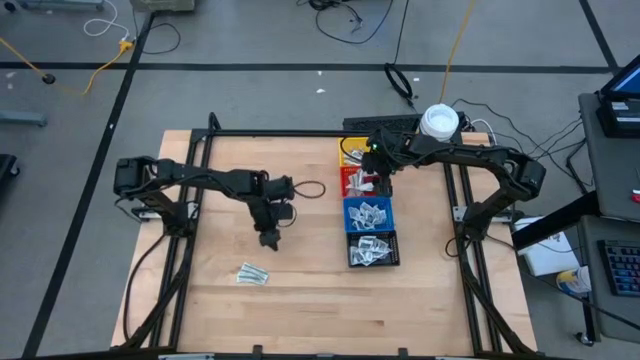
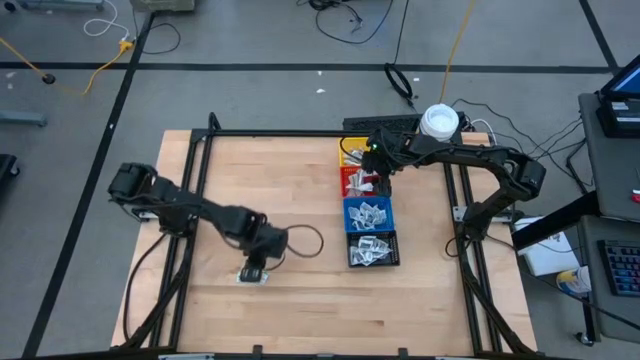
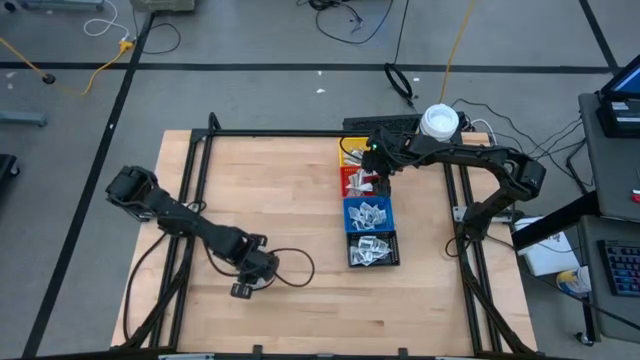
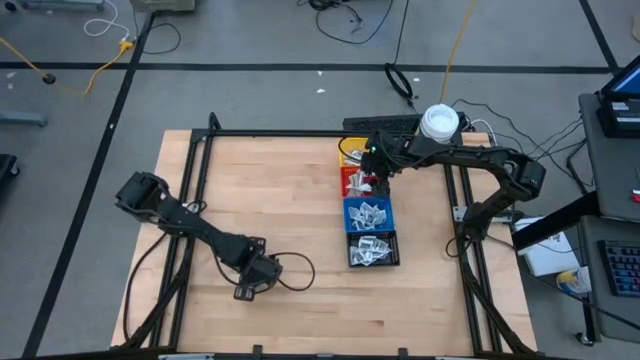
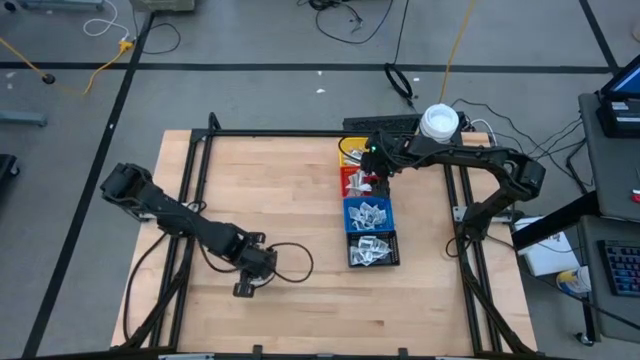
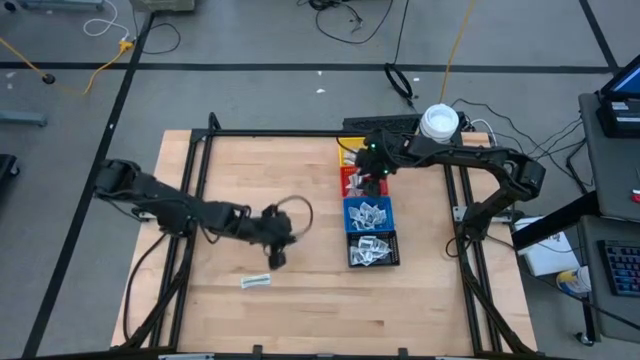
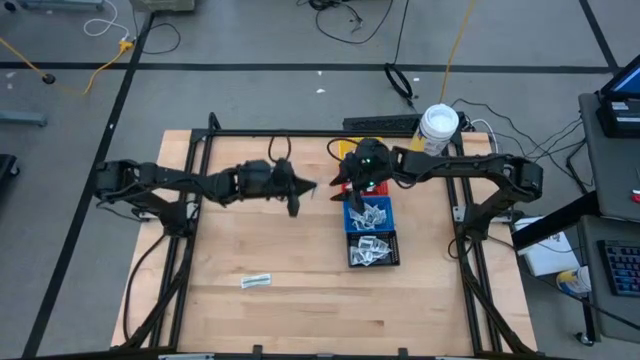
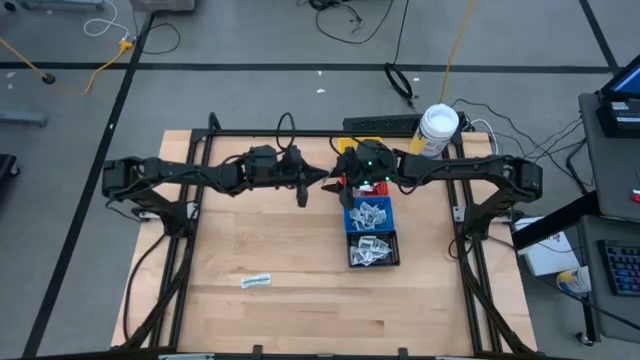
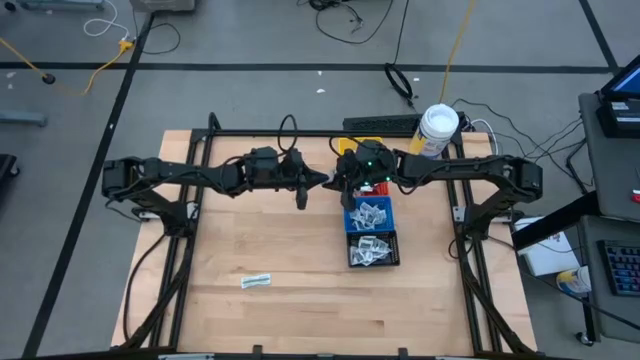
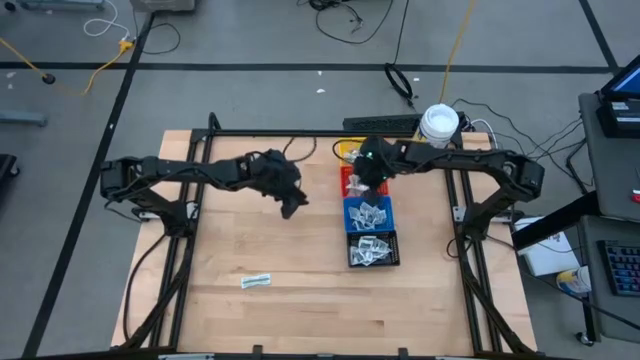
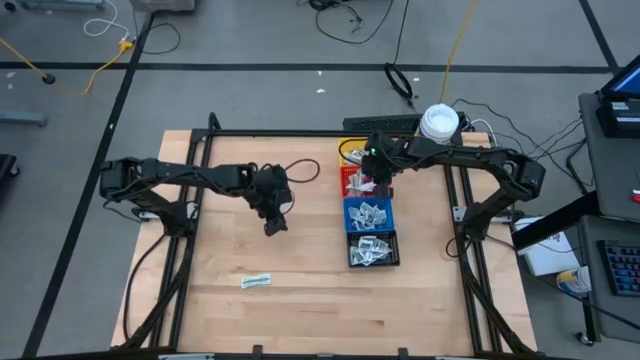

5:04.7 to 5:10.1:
Task: Pick & Place First Aid Supplies
Put the green bandage pack into the red bin

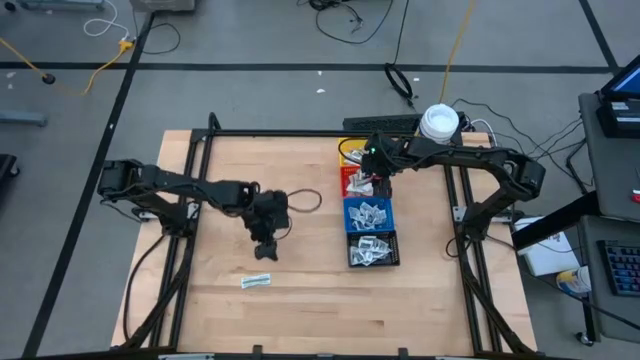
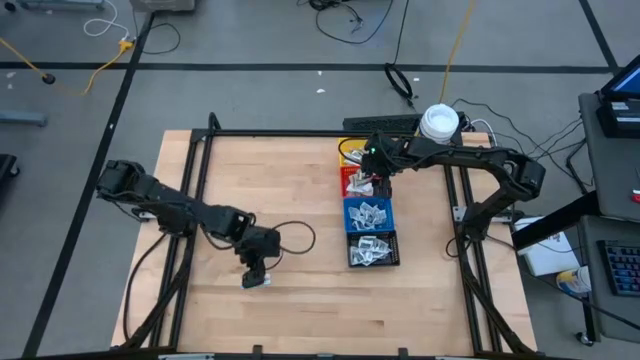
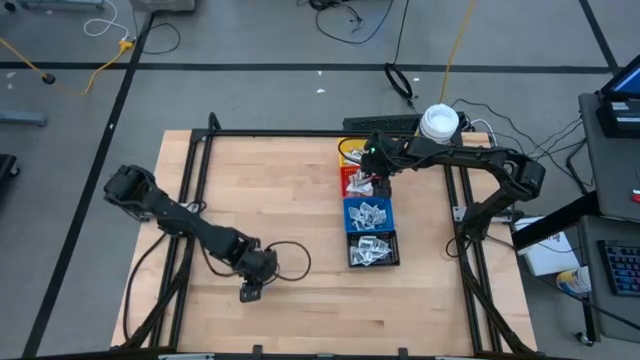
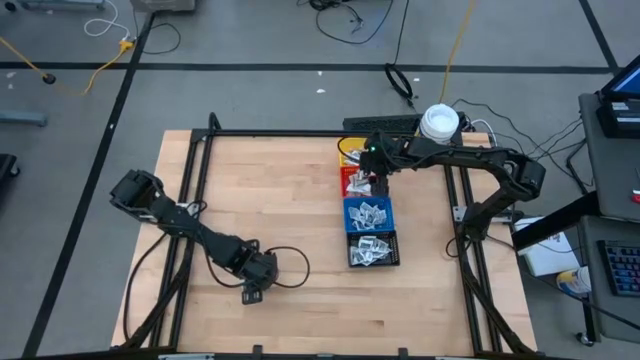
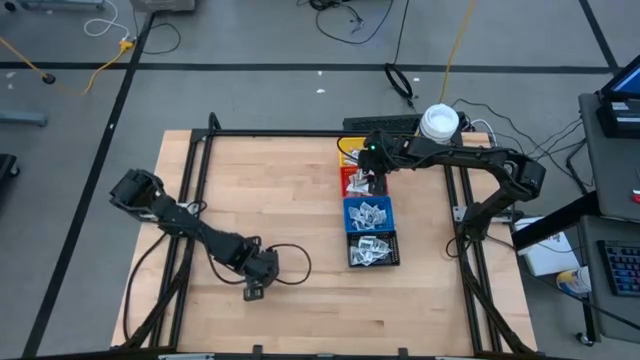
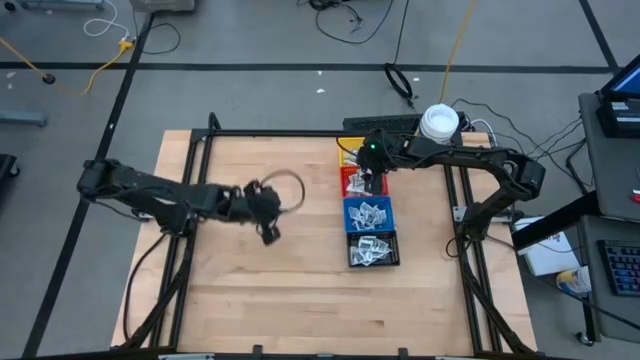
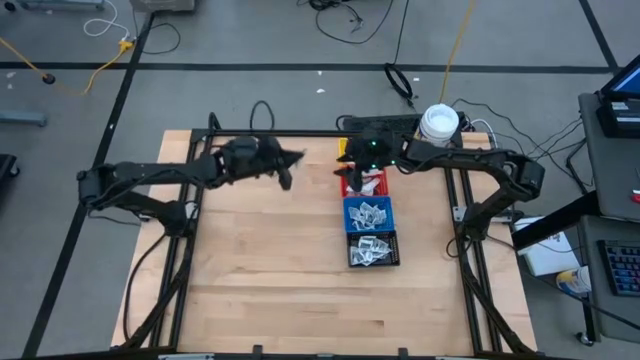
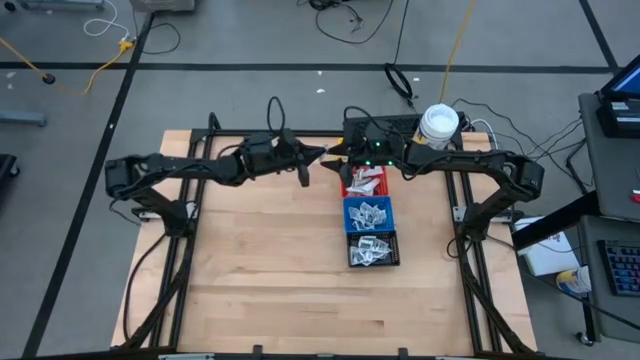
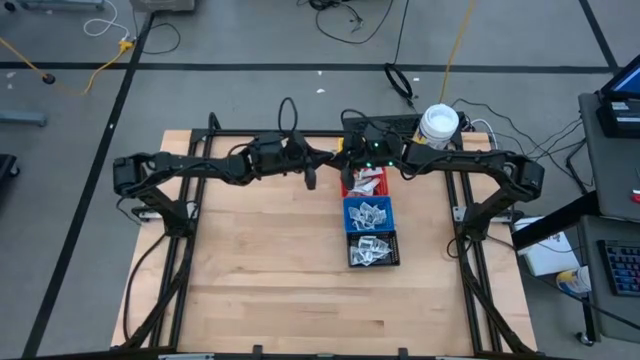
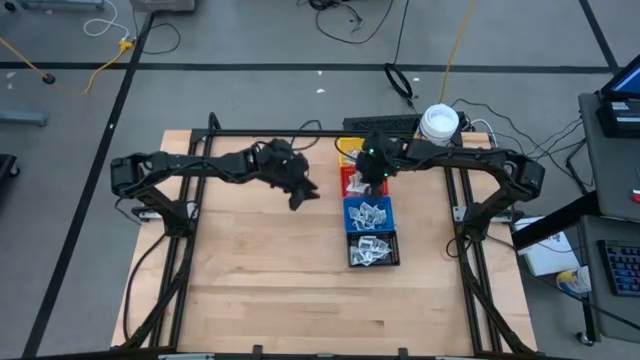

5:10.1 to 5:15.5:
Put the green bandage pack into the red bin

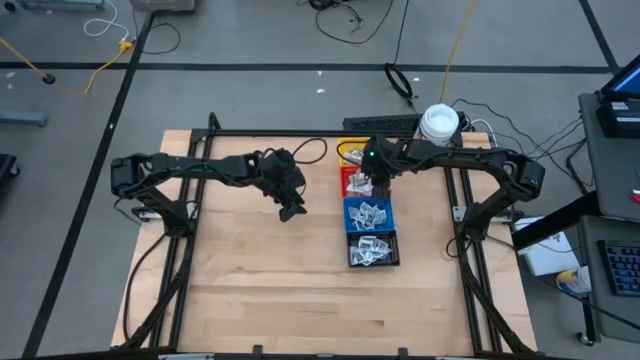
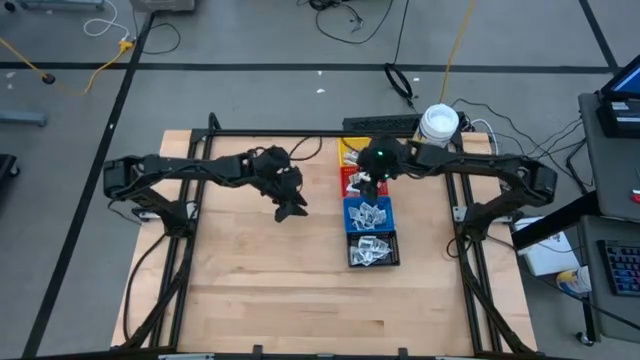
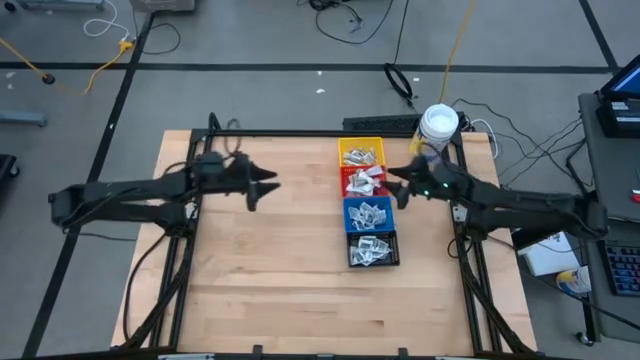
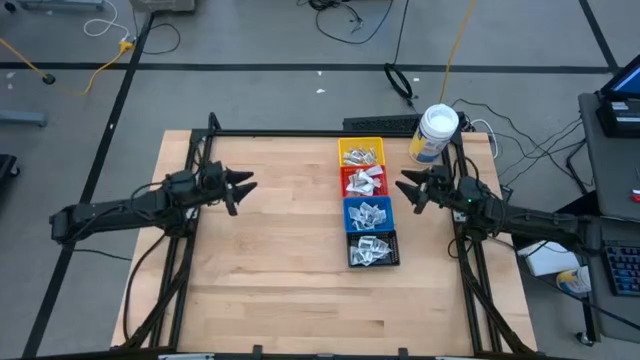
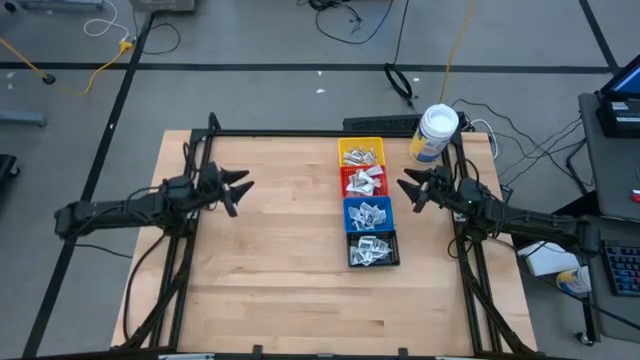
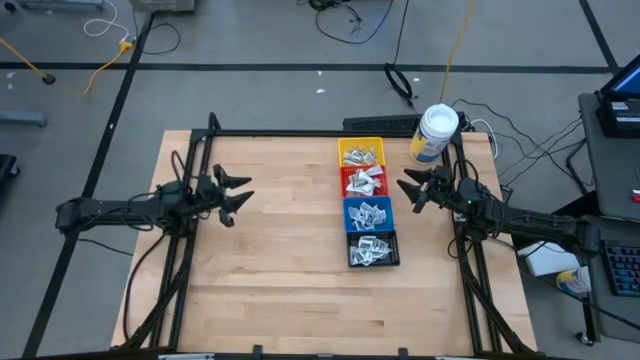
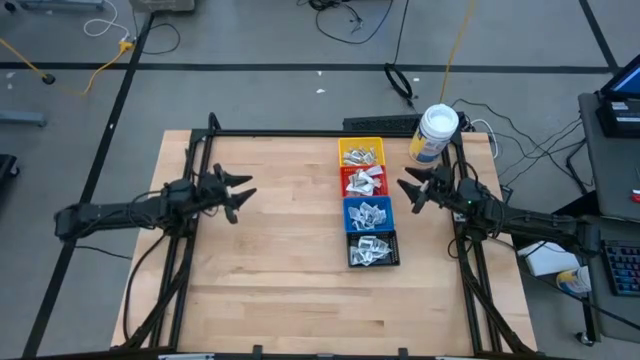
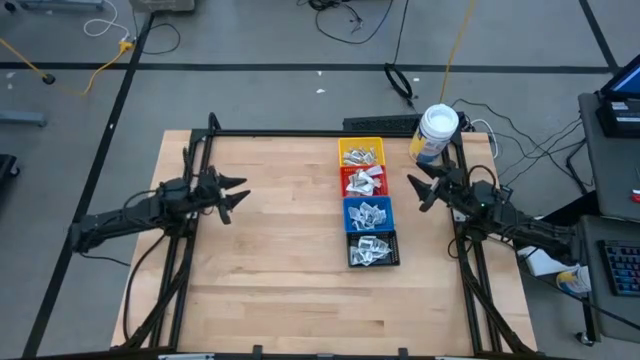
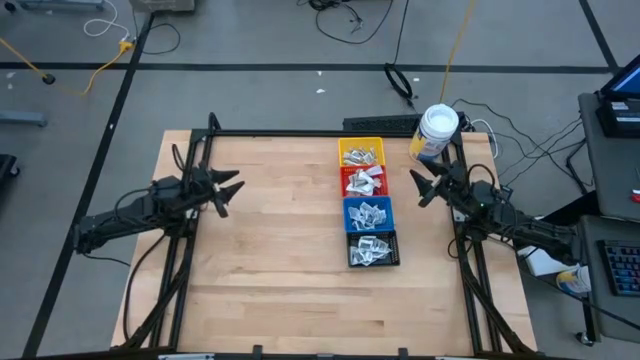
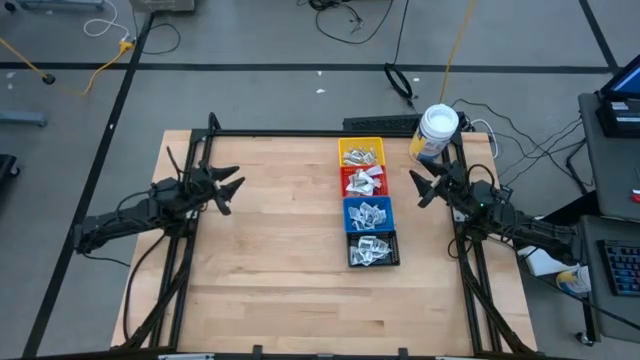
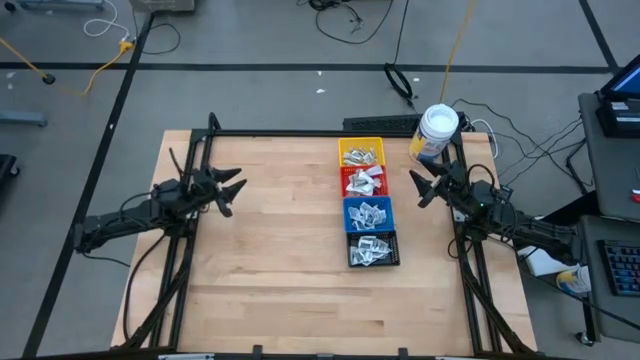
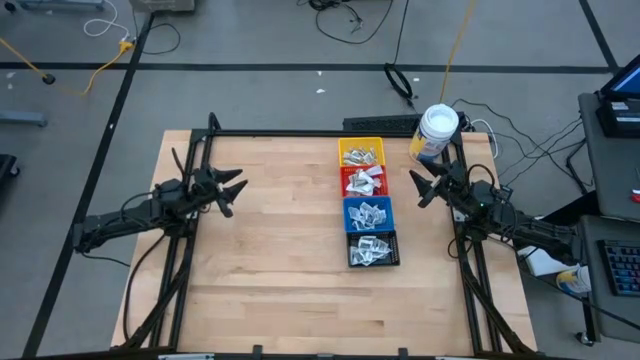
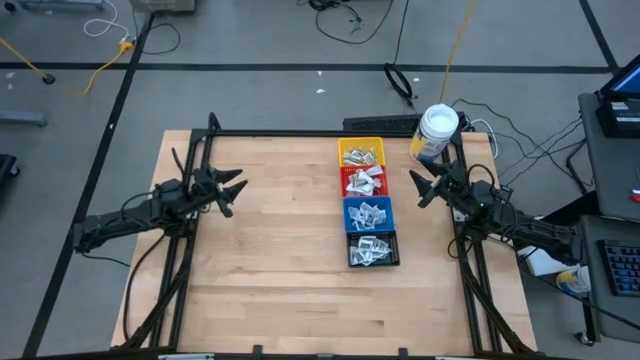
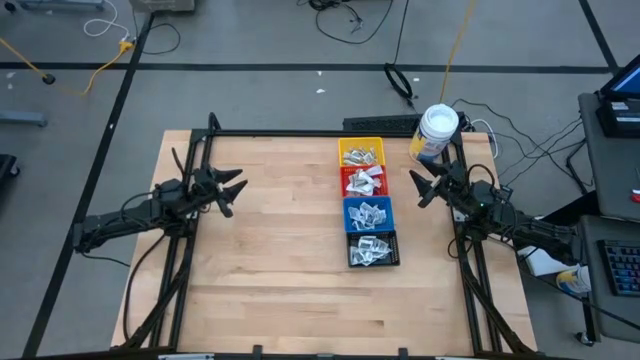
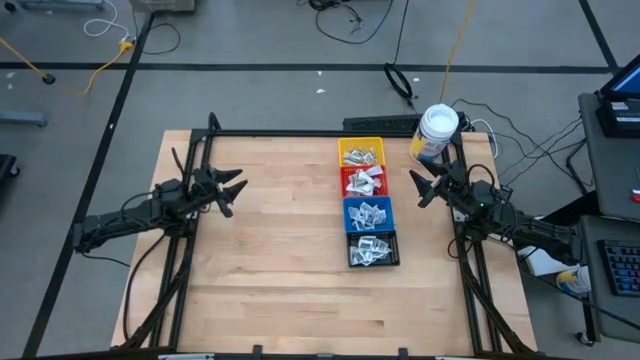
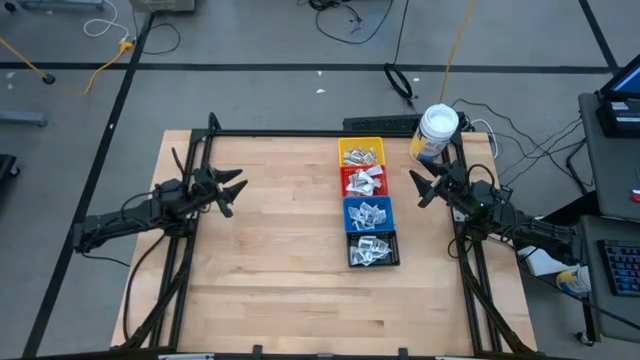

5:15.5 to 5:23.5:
Return to Home Position

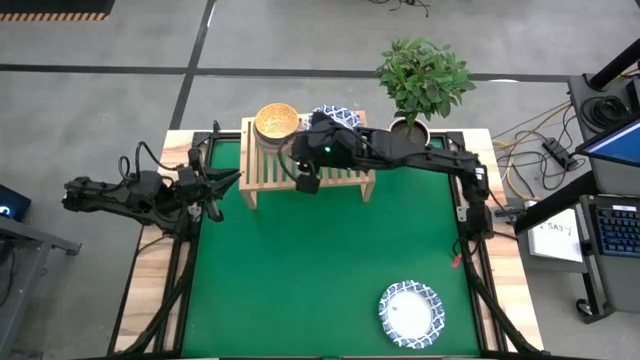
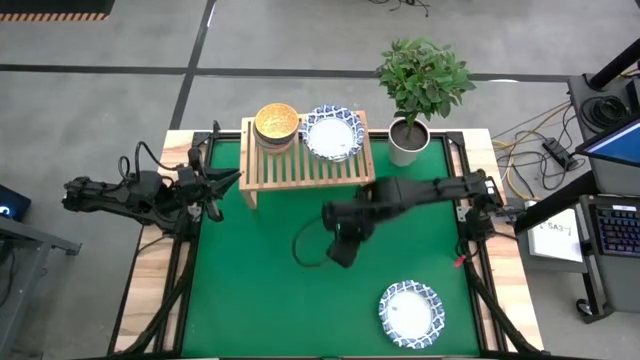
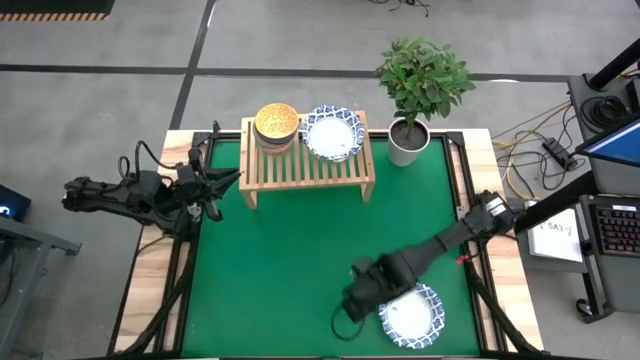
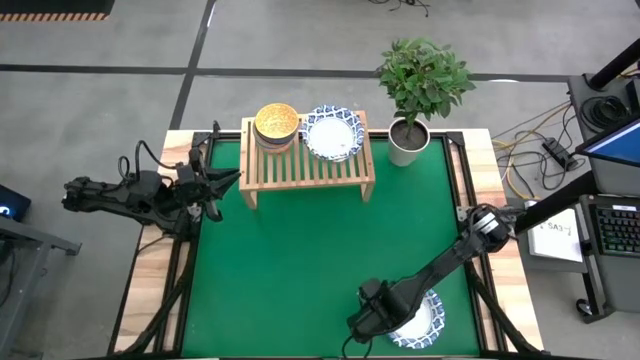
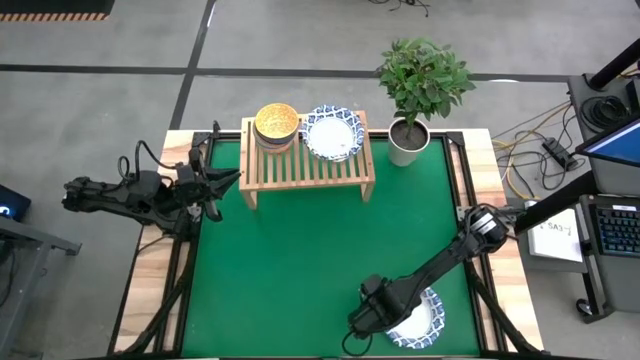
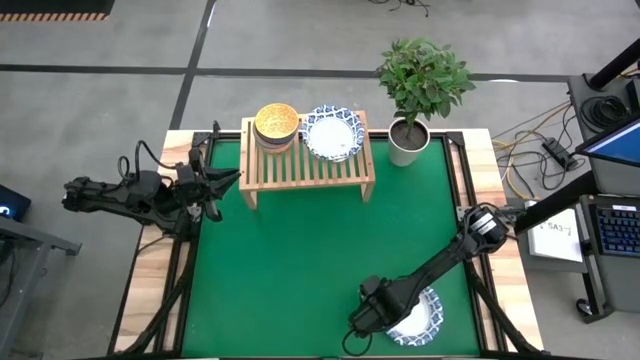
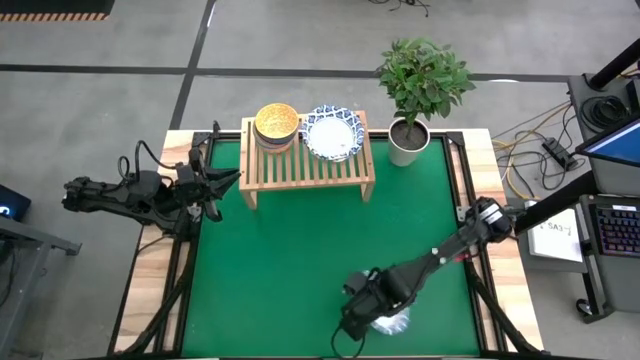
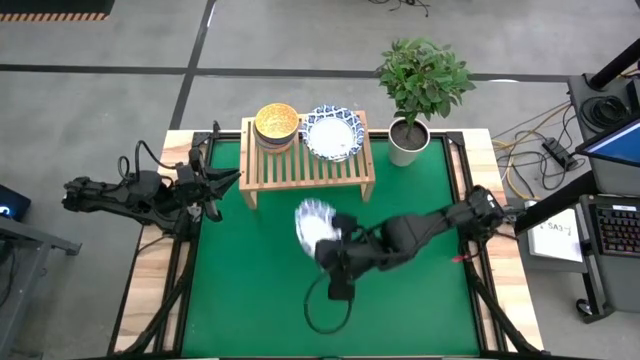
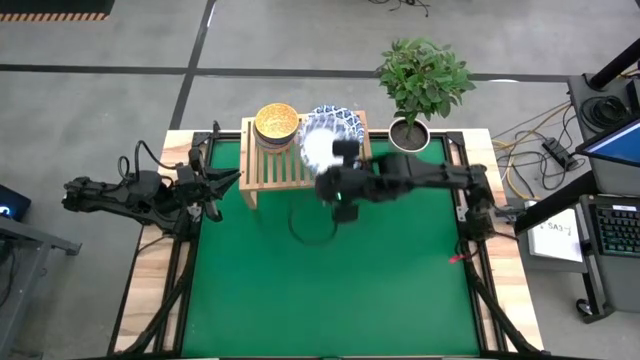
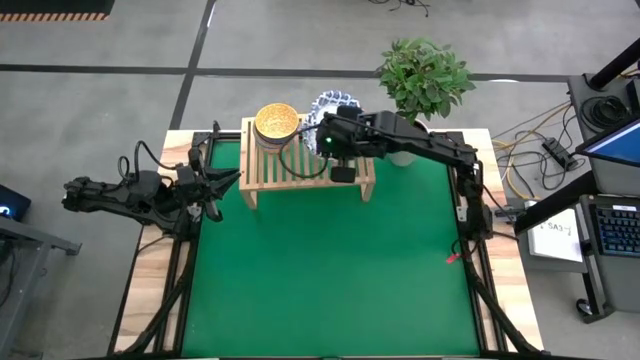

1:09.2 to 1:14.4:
Task: Place and stack bowls onto a shelf
Stack the white bowl on top of the white bowl on the shelf
